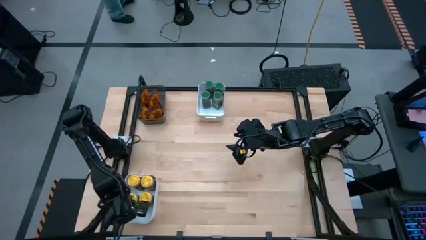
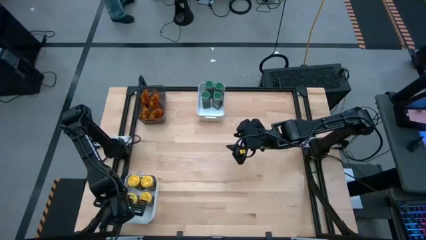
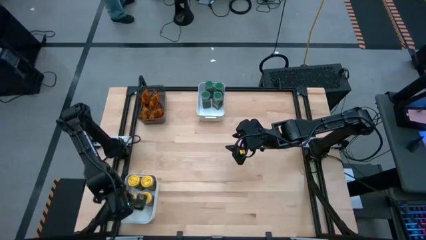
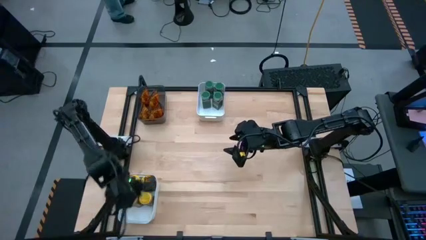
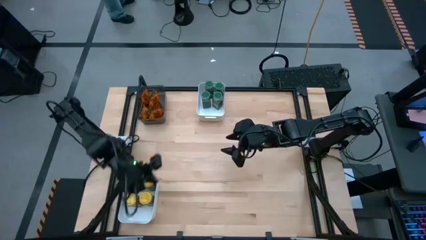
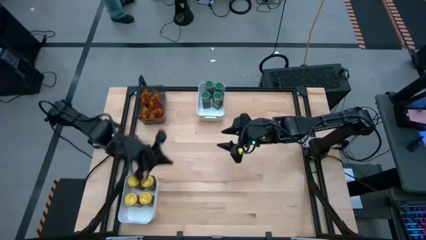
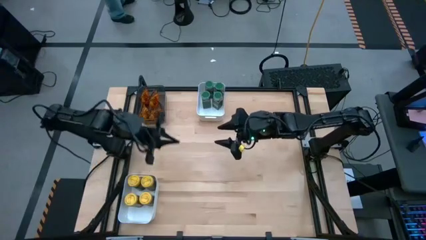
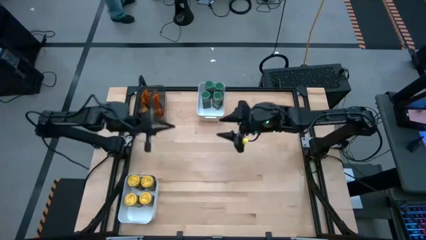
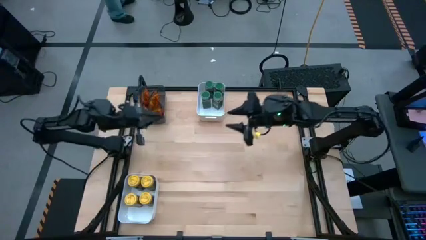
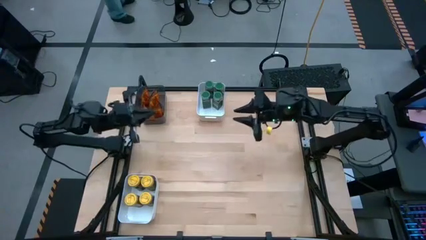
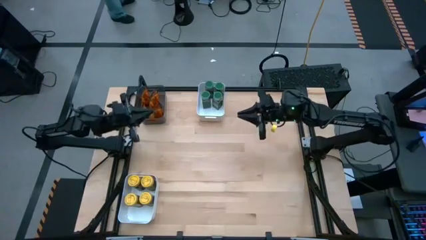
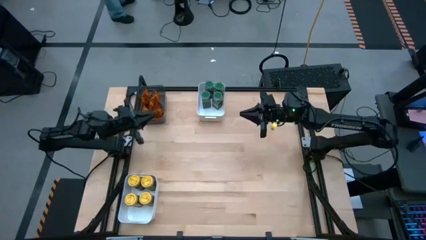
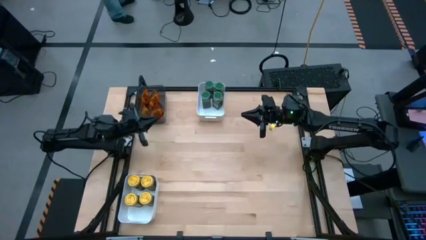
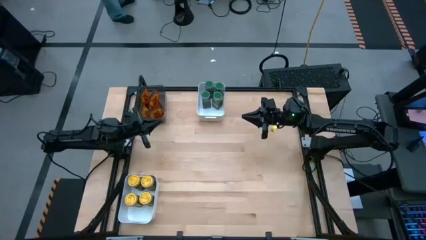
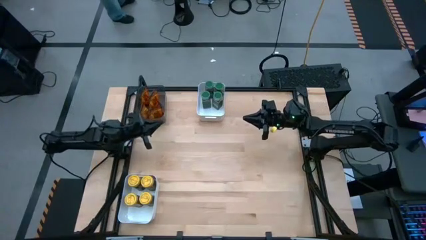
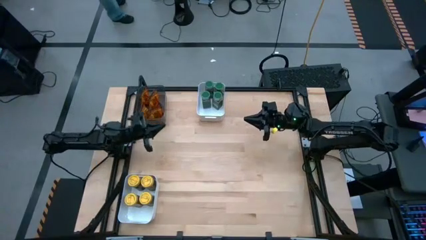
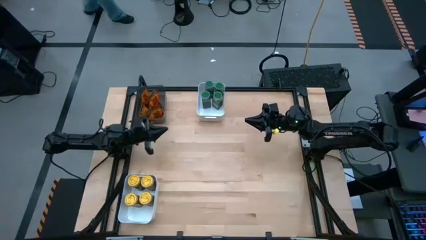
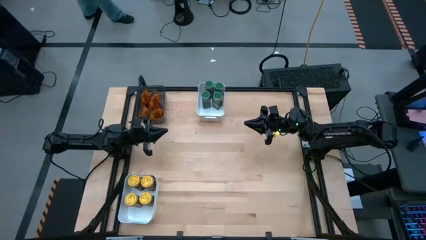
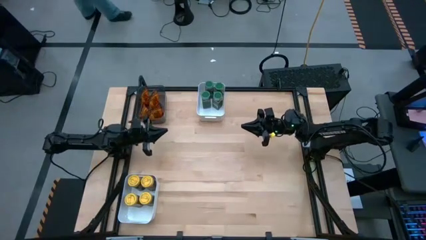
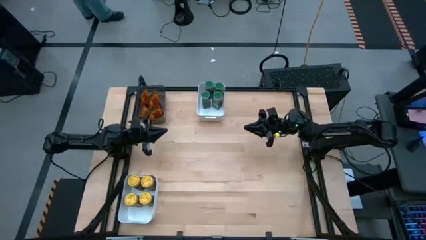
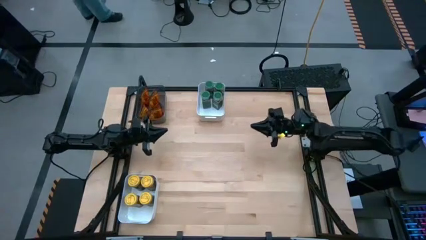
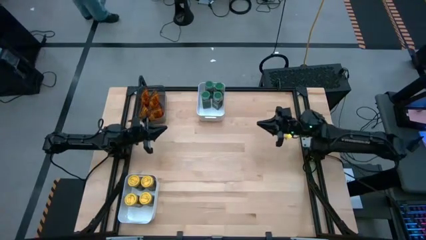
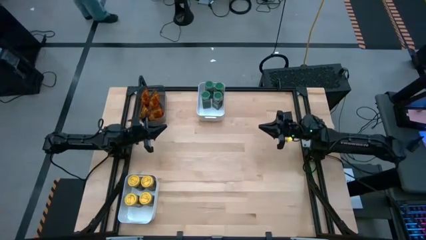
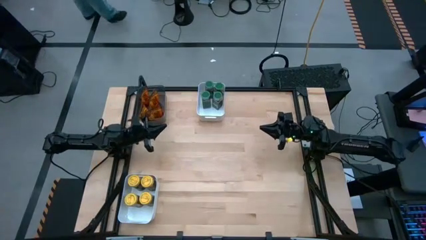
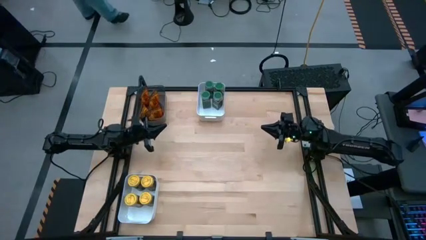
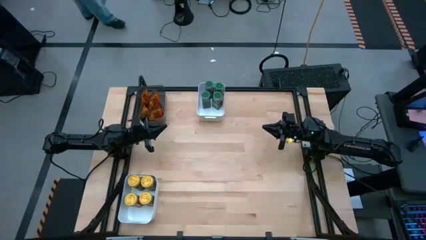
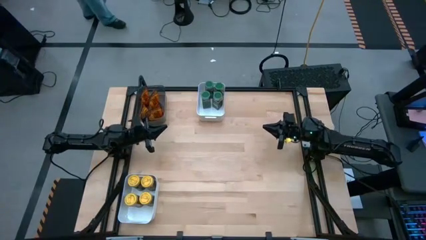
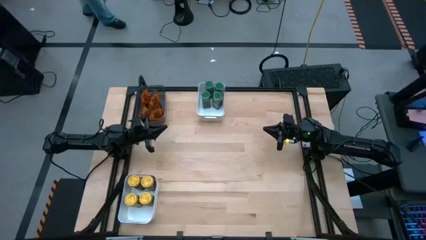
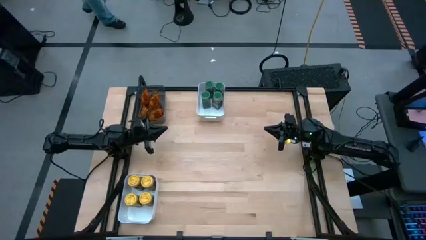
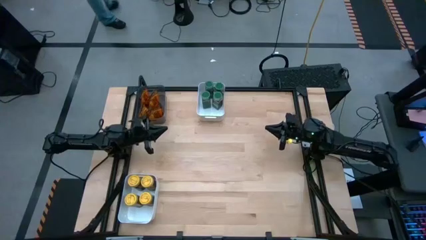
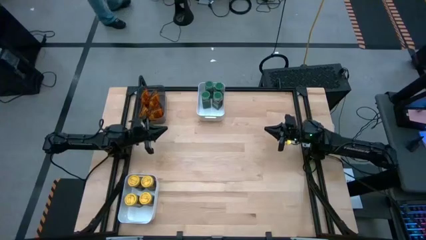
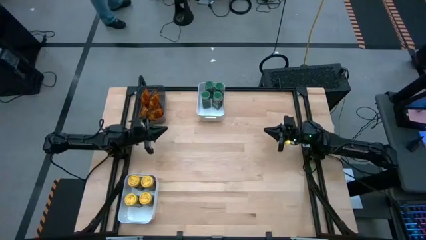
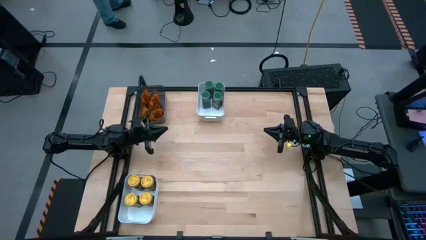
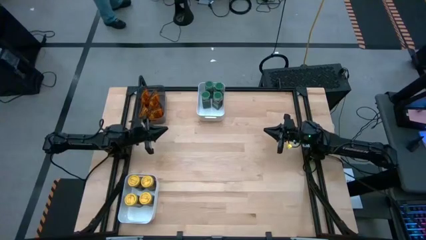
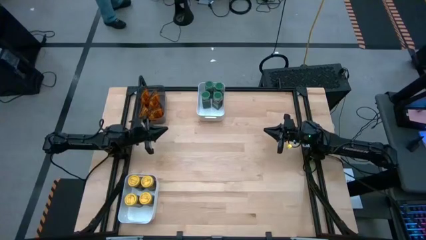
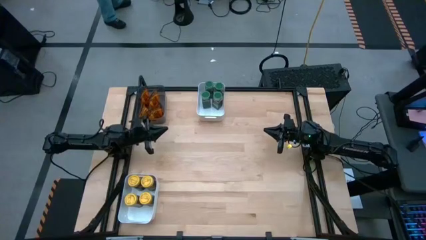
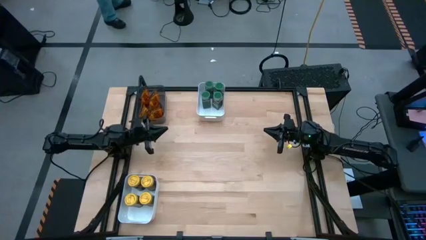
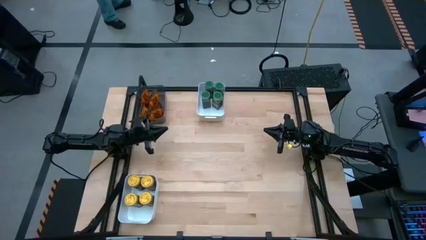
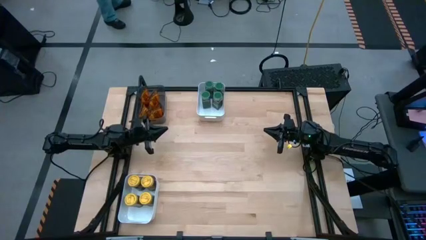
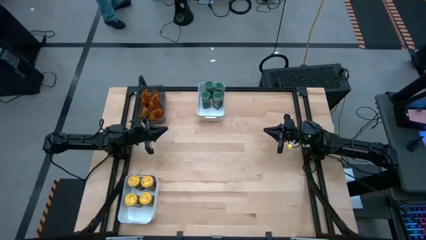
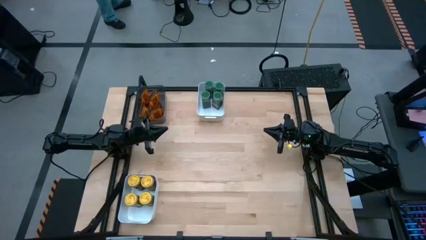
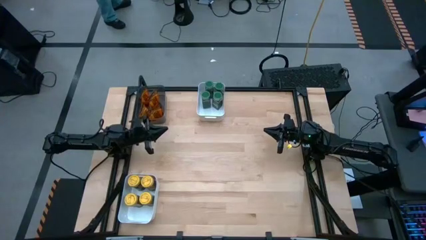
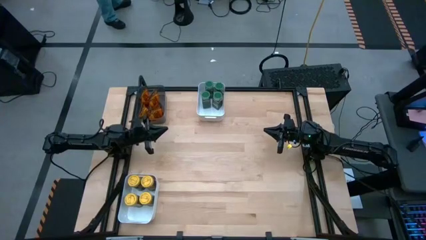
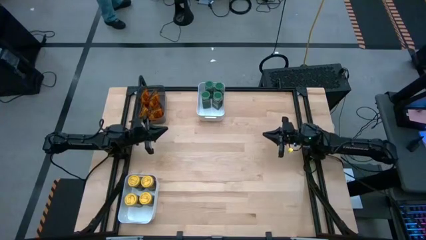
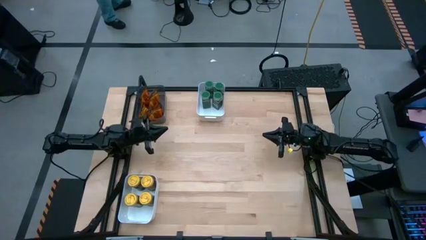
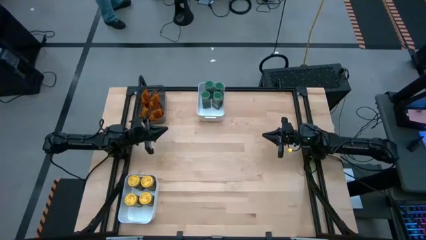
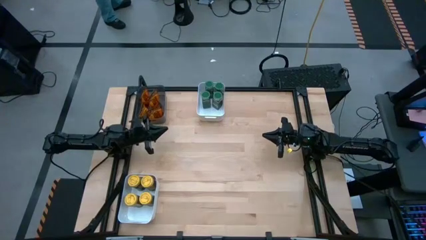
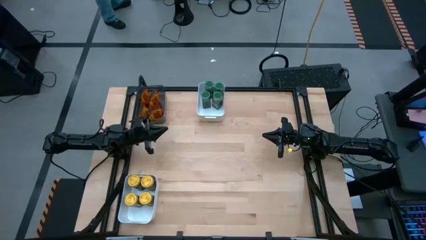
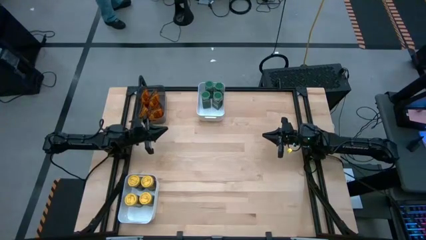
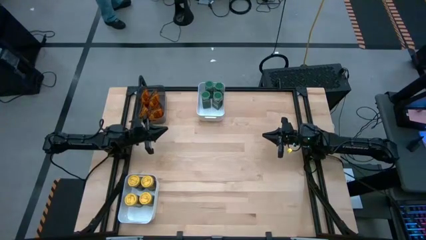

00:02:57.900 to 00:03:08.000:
Task: Sort spices by type
Return to Home Position

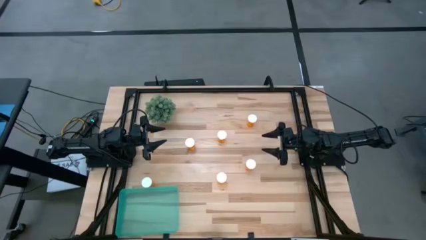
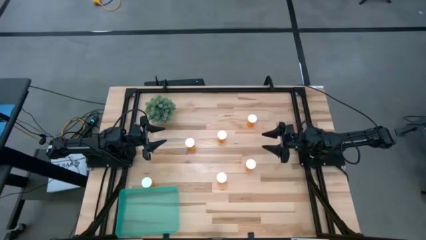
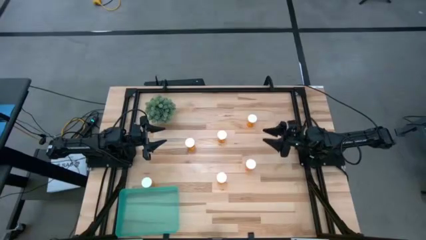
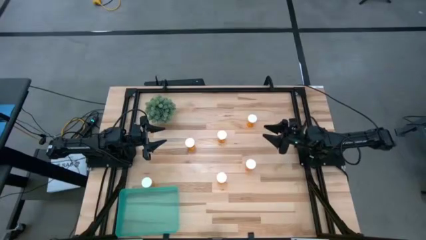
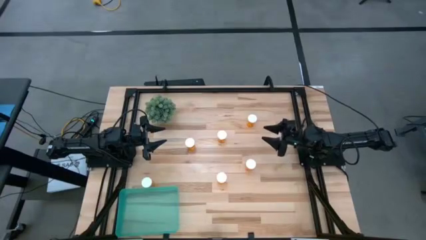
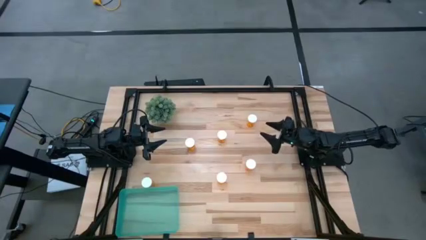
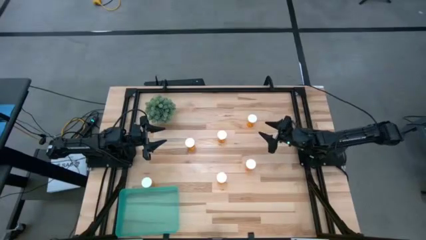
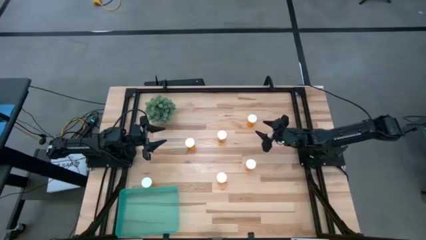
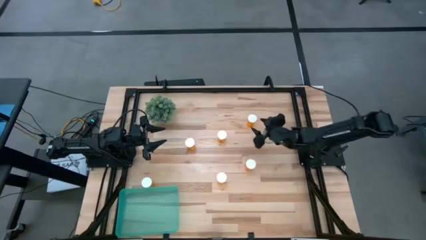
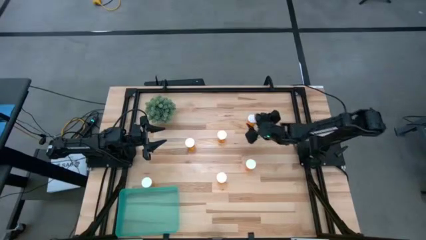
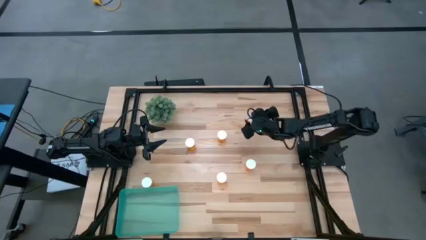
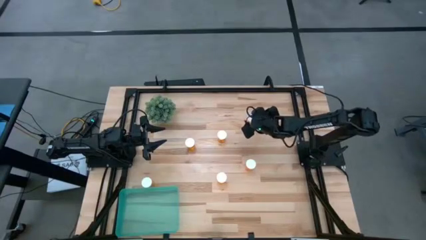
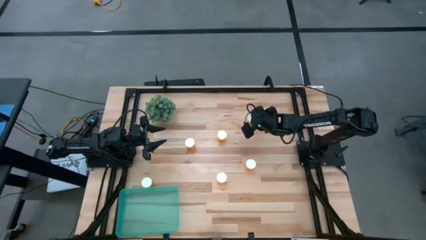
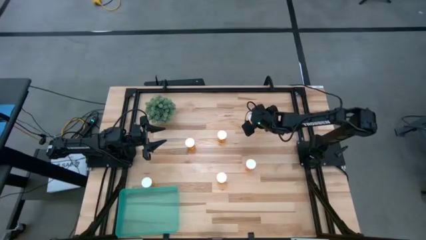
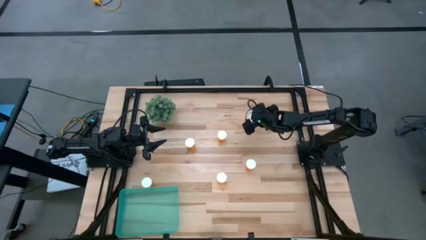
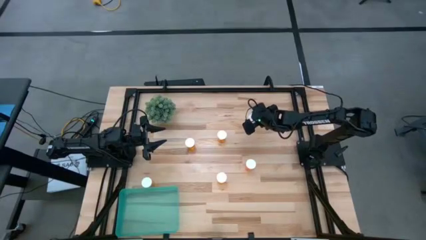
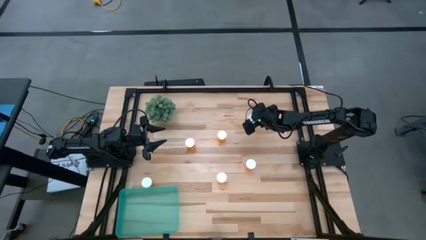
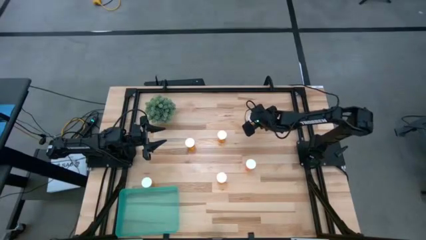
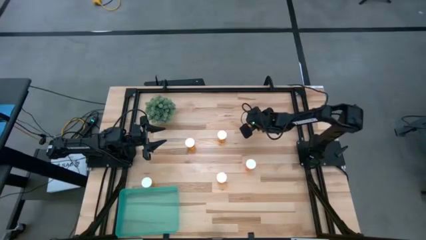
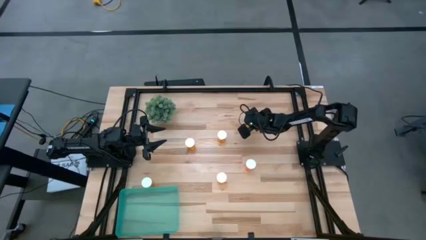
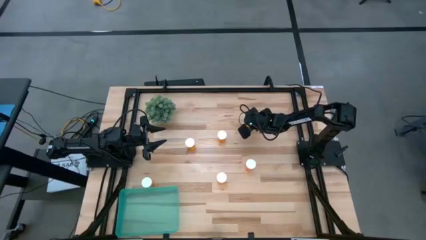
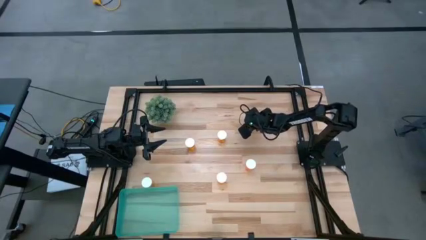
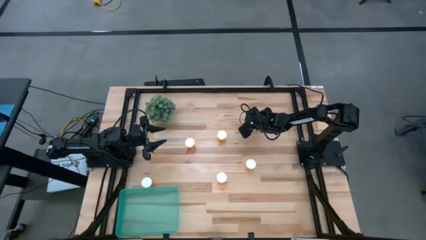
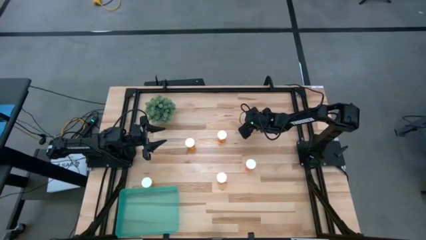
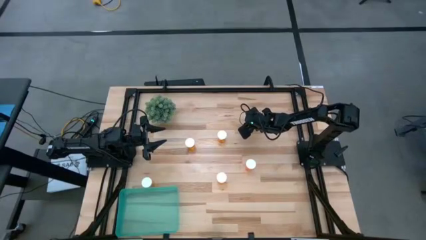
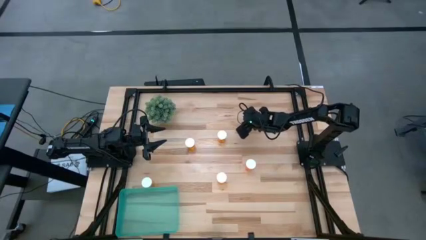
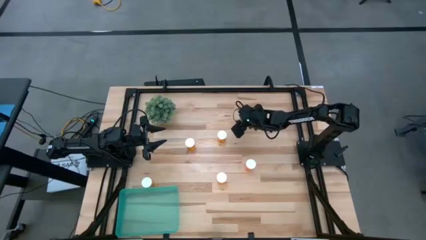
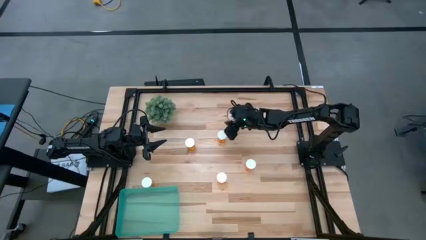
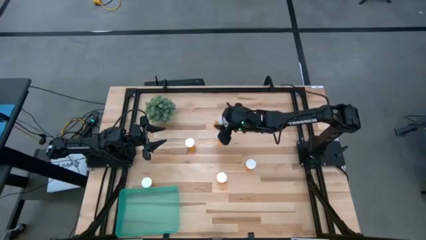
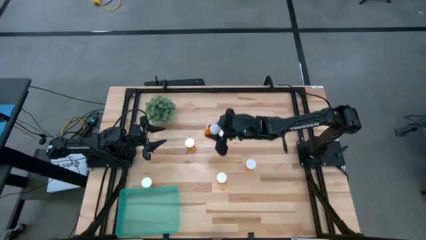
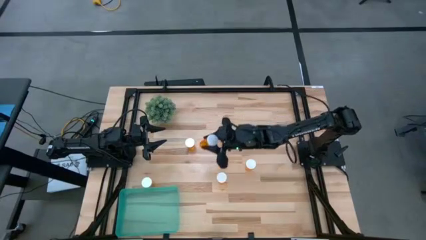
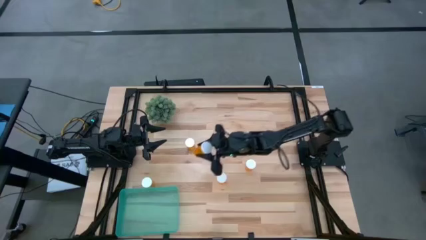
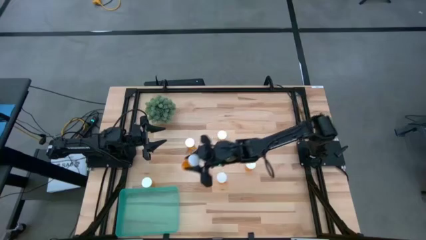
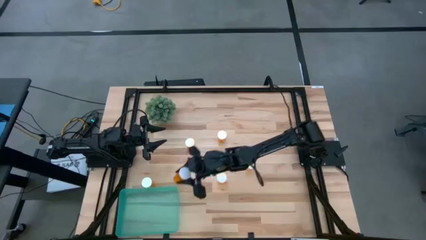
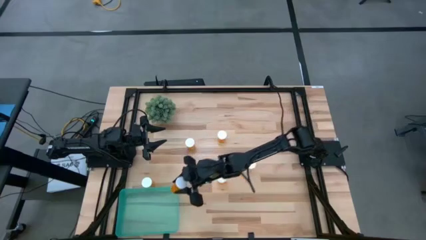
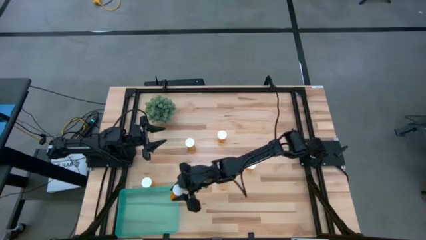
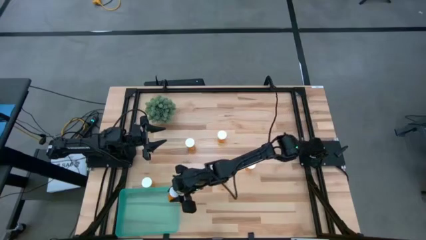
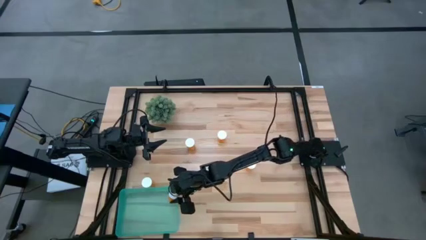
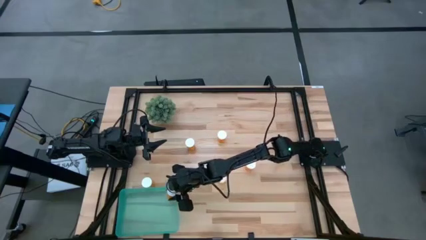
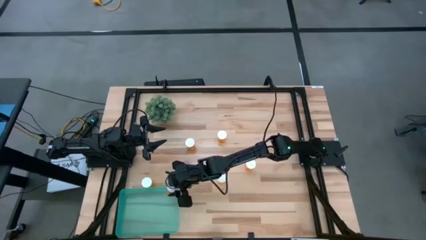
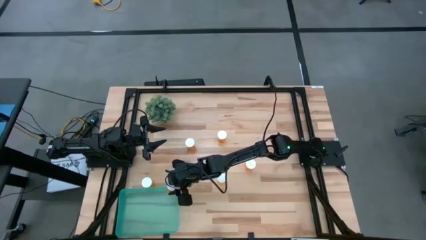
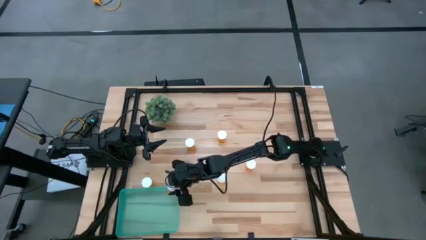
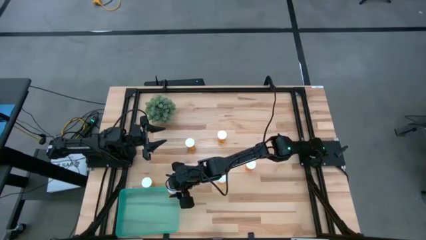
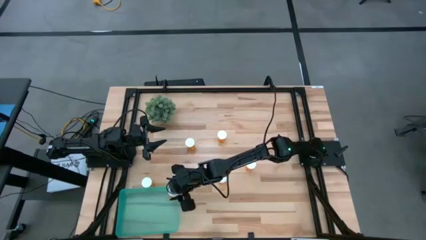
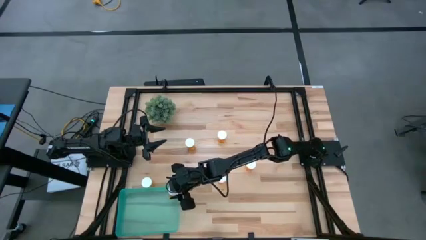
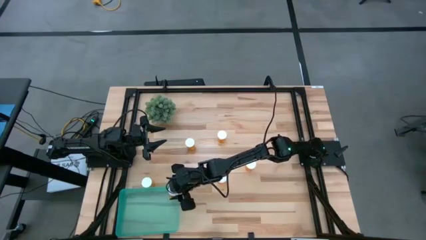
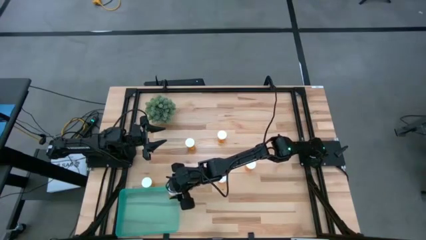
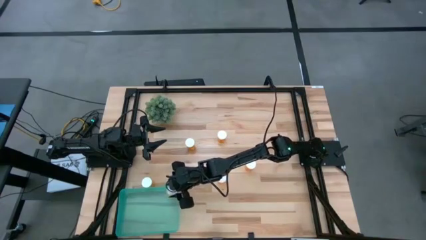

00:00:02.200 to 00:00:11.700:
Task: Pick and place pill bottles into a basket
Put the yellow pill bottle into the green bin
